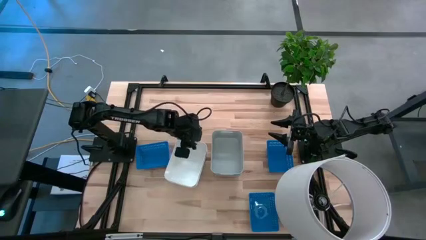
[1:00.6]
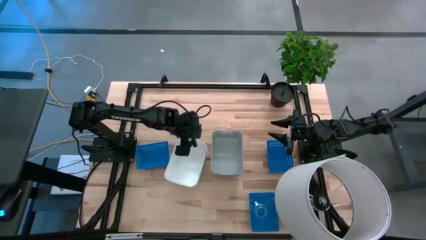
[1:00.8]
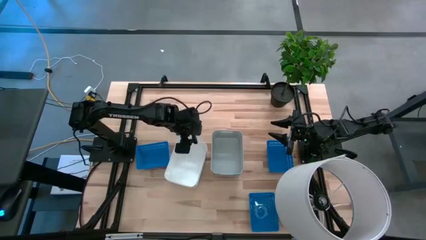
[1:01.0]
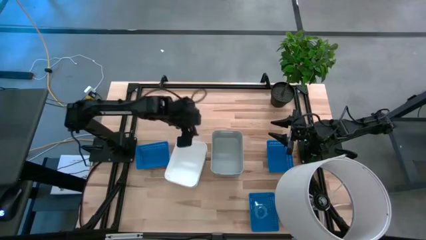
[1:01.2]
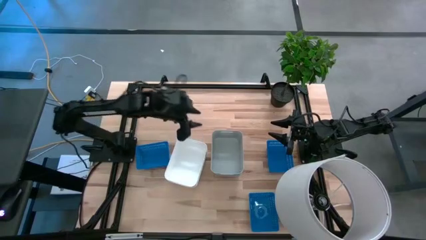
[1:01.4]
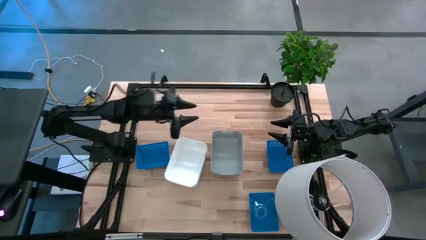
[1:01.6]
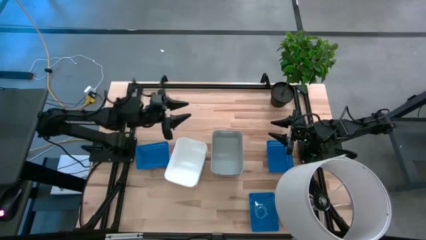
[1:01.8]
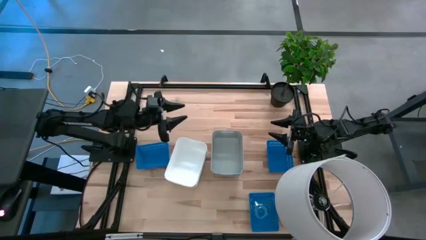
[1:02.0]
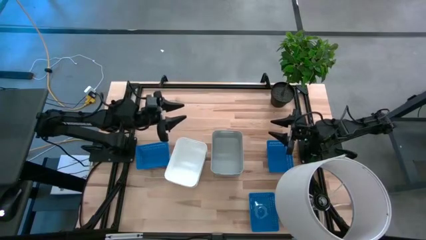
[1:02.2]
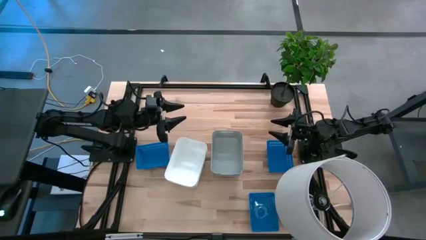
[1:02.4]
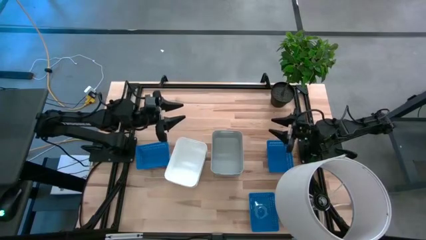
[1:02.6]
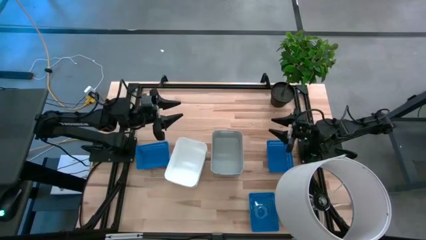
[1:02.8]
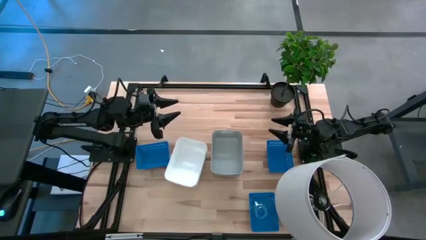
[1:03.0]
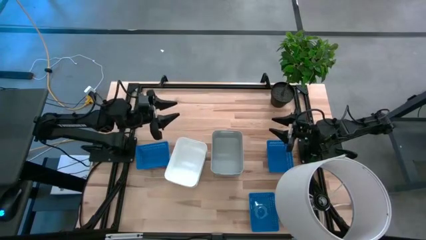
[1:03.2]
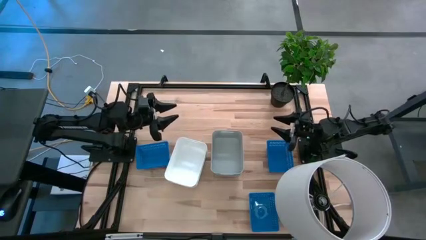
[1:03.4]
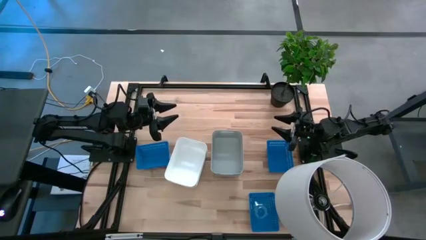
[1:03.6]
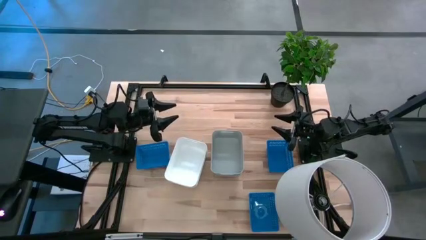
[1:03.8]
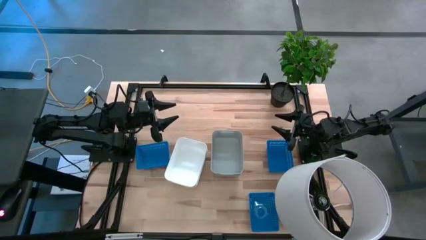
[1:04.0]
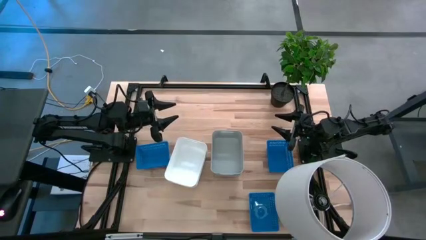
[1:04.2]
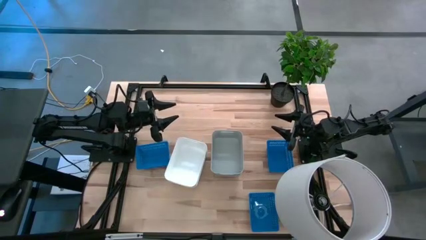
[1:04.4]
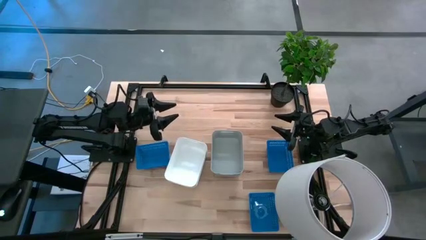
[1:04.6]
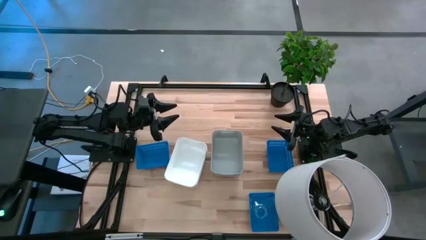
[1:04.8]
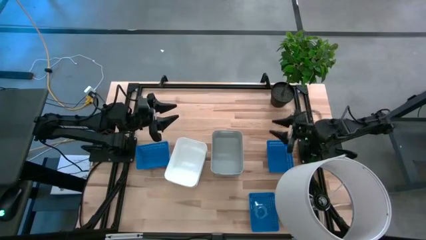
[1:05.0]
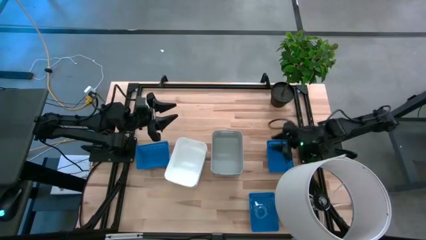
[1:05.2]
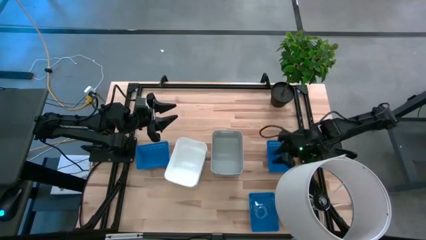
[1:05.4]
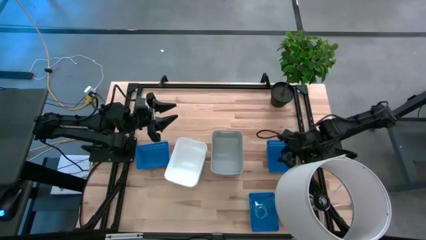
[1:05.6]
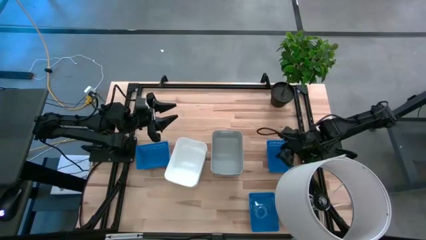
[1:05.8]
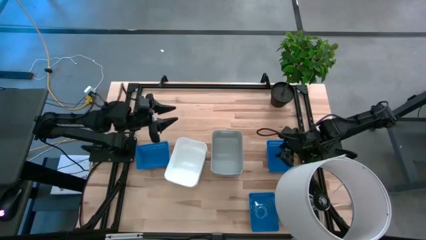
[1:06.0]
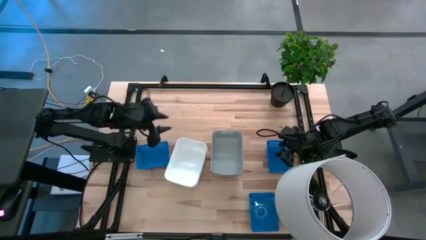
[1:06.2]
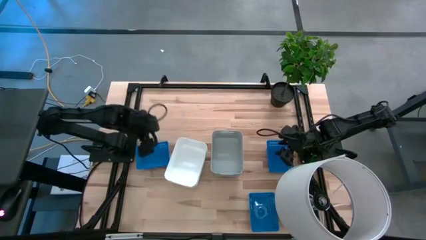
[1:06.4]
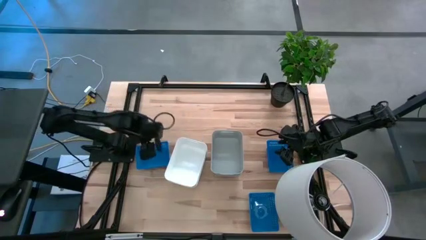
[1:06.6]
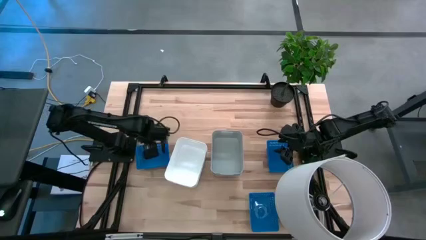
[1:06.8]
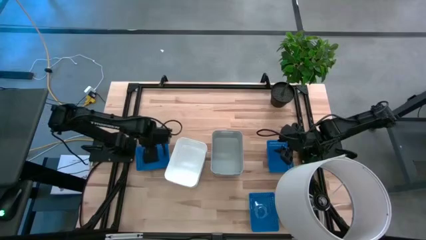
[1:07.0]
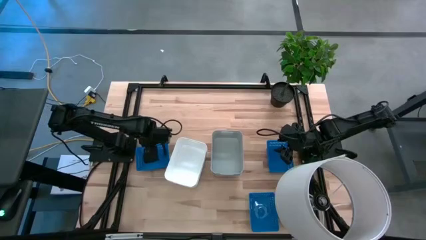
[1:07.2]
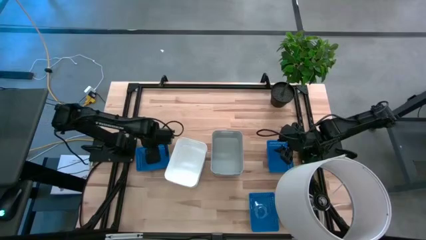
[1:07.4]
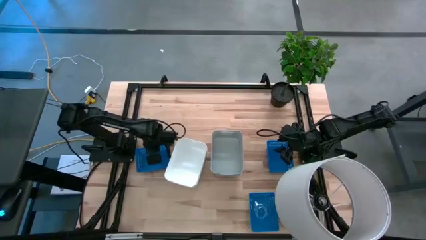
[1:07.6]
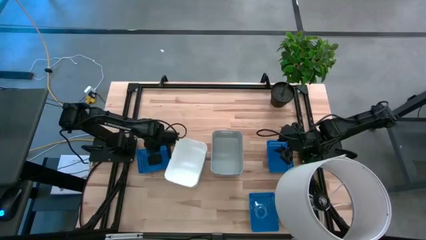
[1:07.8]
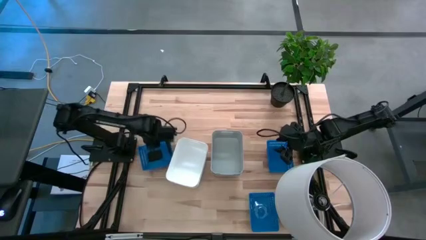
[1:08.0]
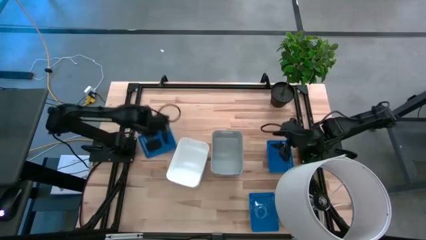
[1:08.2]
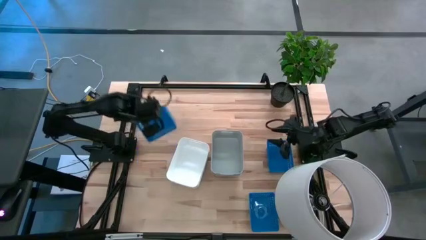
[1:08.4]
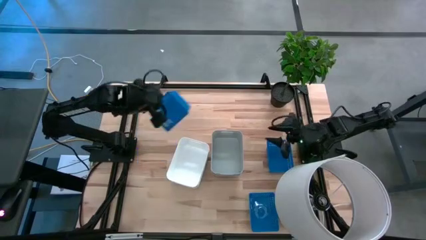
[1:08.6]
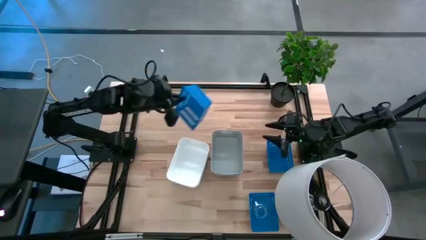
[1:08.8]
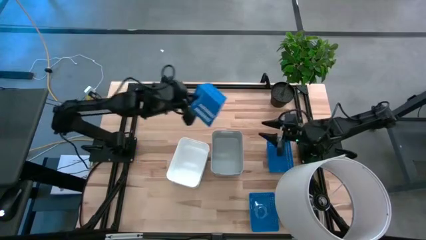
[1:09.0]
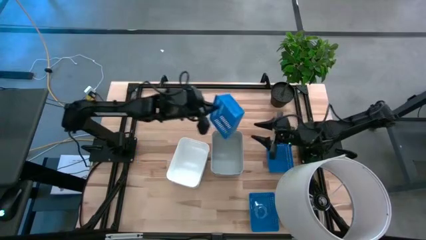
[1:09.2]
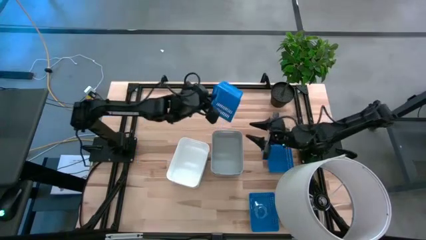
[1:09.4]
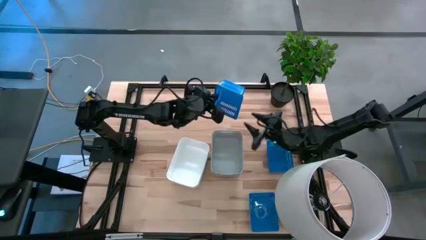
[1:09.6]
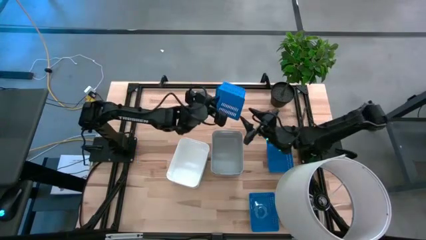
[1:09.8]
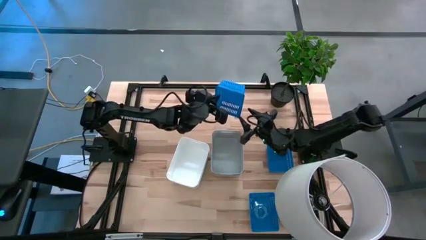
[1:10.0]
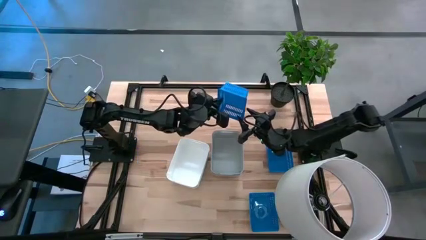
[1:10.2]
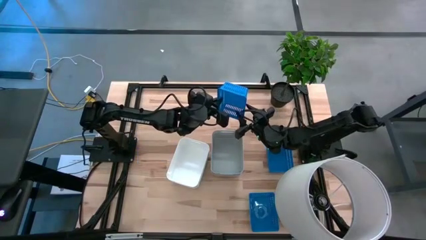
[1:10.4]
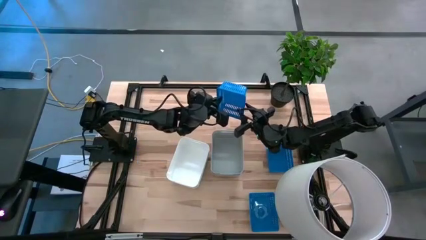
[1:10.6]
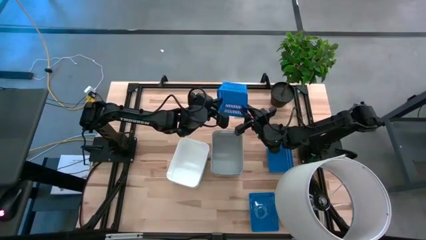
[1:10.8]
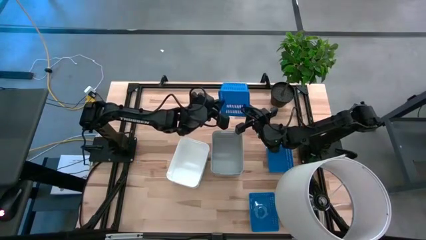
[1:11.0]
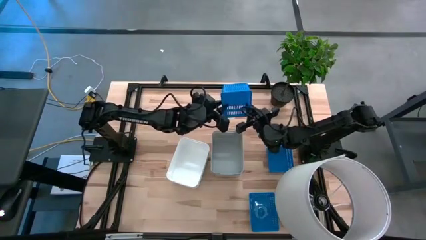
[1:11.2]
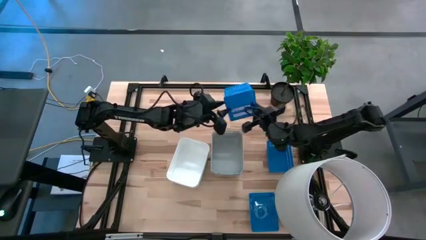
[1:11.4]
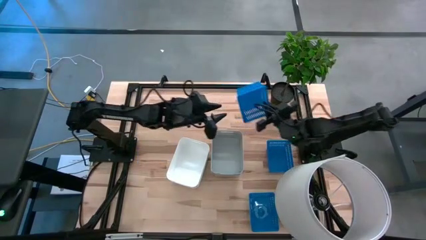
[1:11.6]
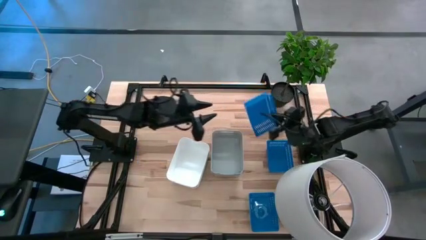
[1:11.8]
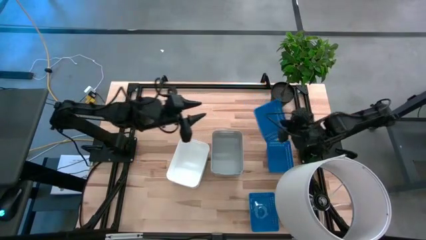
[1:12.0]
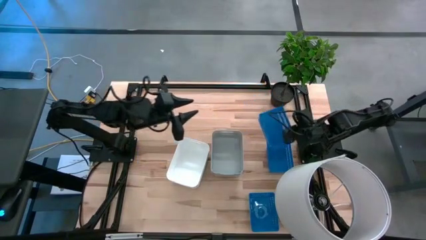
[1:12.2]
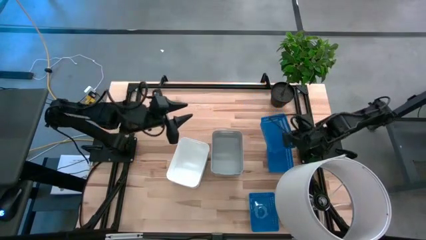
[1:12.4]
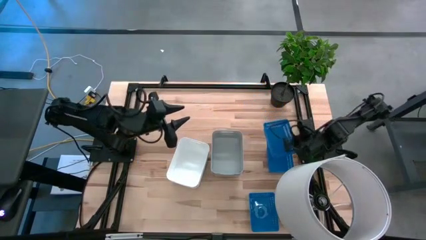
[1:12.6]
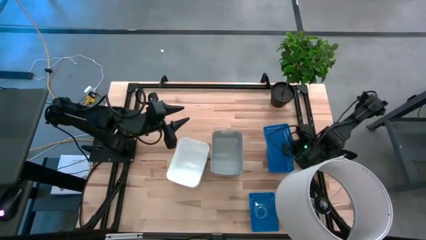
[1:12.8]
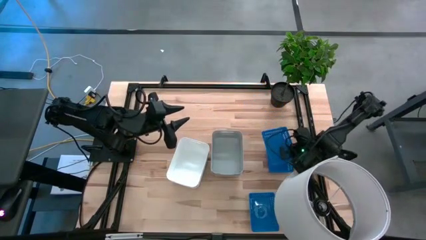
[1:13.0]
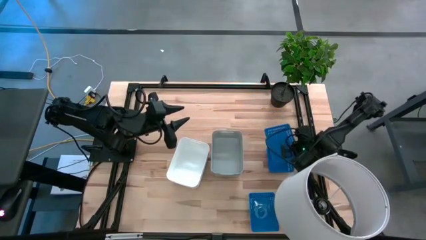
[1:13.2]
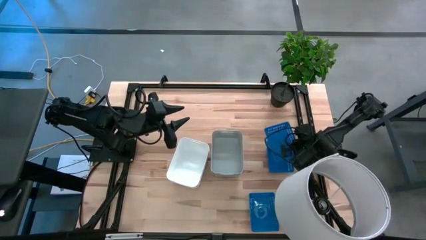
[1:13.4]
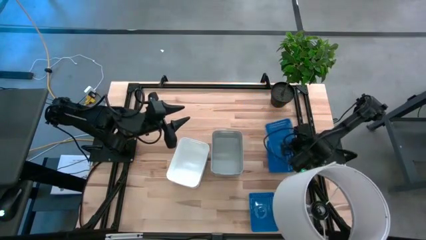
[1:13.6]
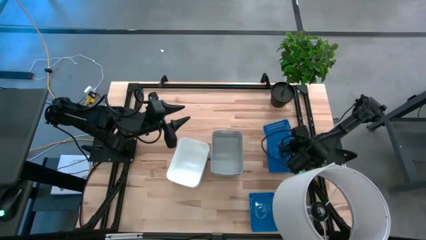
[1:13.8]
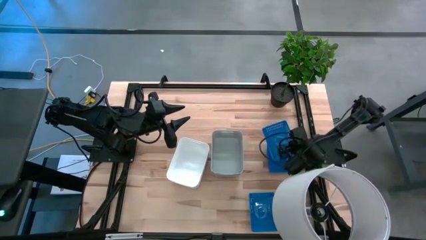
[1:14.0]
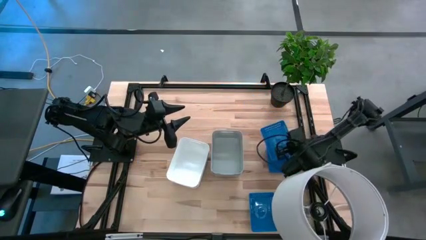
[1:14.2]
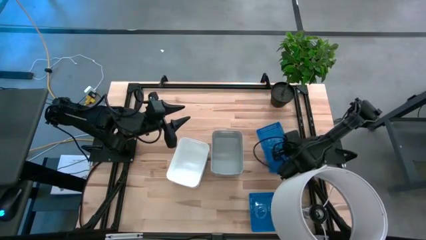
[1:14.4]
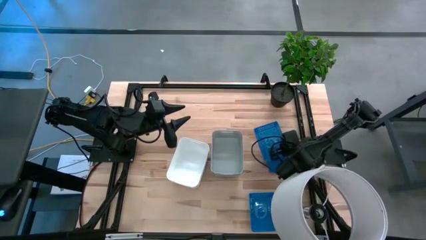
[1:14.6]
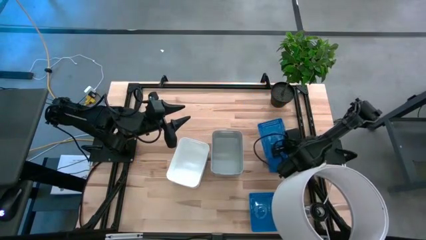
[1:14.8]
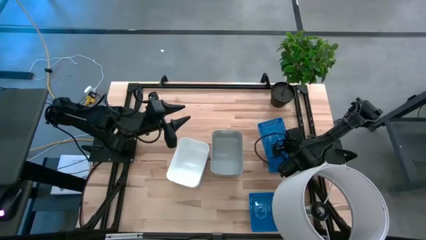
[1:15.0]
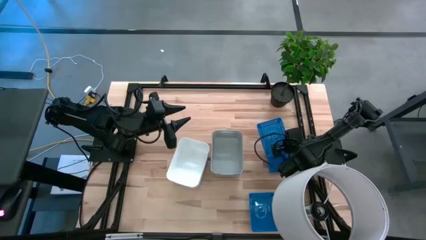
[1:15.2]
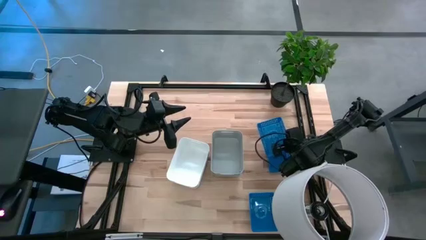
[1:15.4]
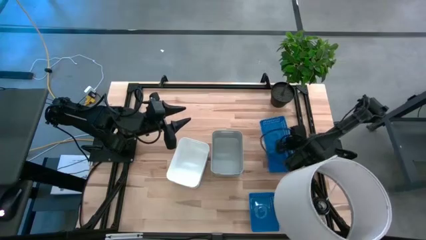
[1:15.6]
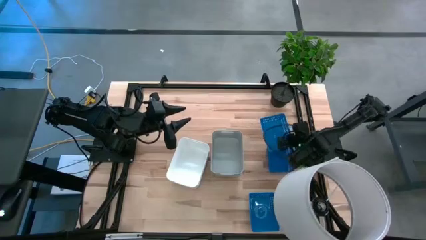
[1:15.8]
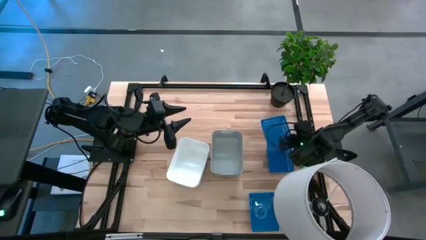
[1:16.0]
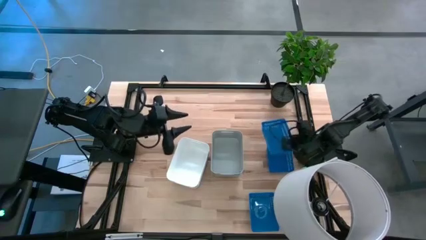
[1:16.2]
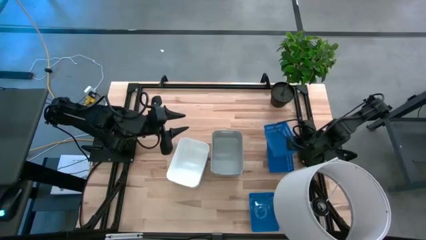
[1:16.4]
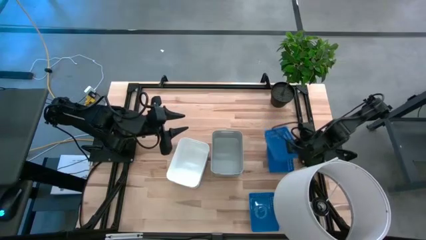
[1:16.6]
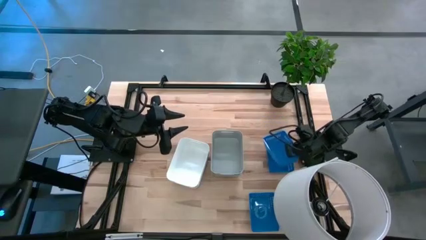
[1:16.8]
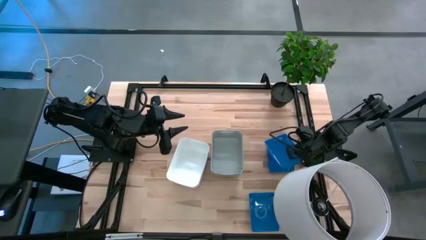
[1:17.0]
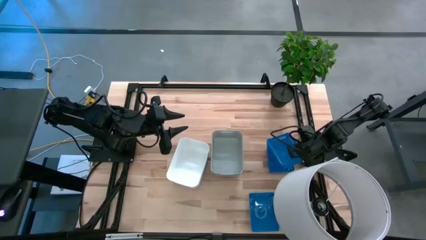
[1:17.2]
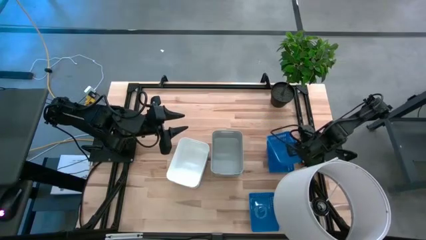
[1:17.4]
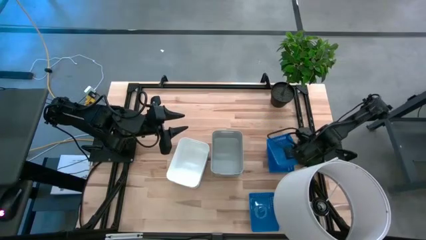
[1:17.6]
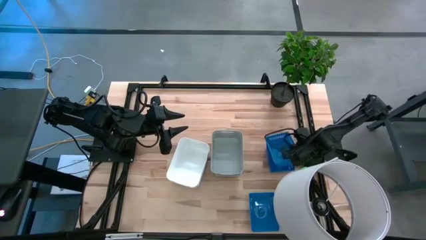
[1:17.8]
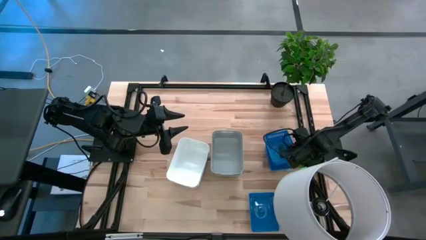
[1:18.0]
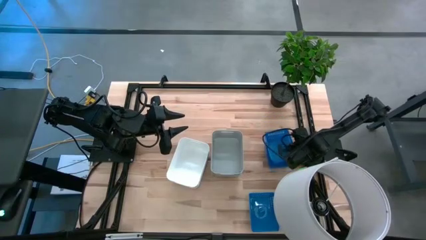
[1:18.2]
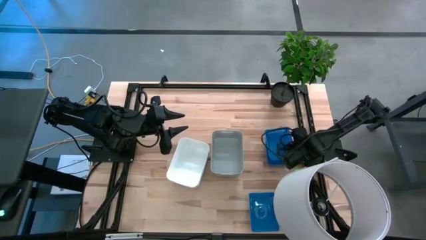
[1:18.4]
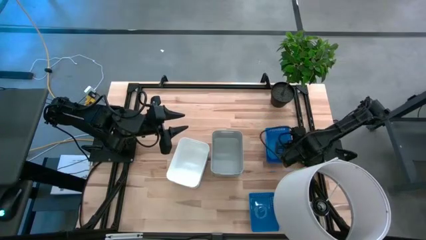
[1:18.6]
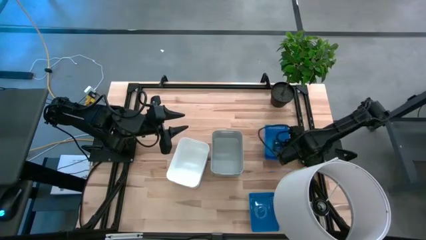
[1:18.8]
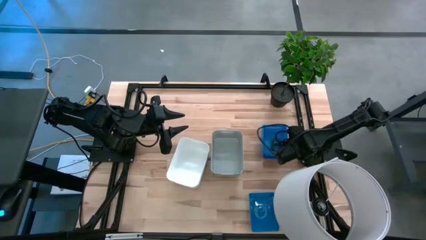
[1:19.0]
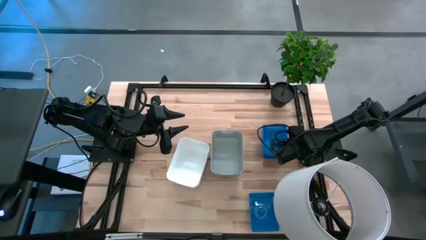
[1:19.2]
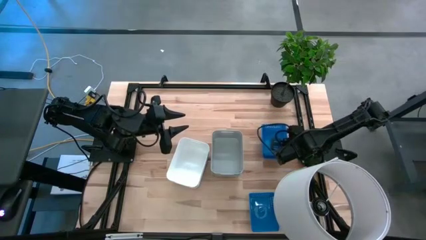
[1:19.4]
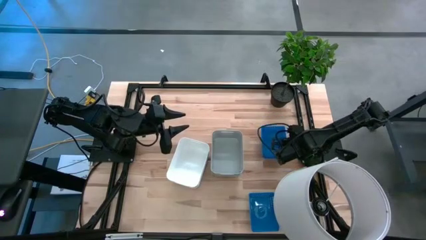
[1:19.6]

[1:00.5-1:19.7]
Stack the top left bin on top of the other top right blue bin
